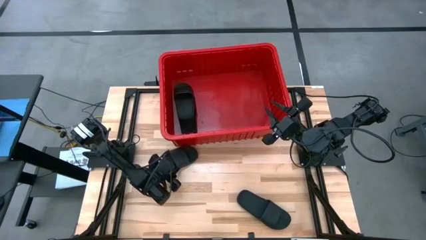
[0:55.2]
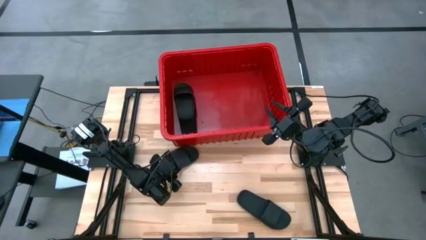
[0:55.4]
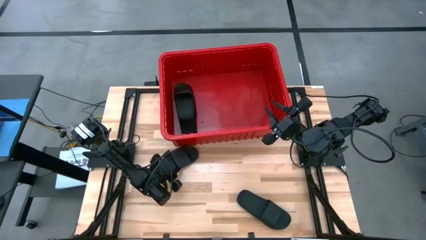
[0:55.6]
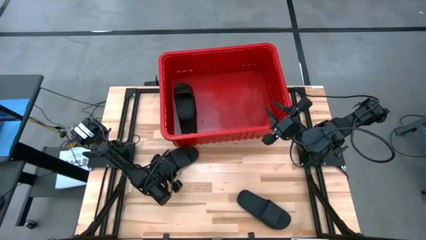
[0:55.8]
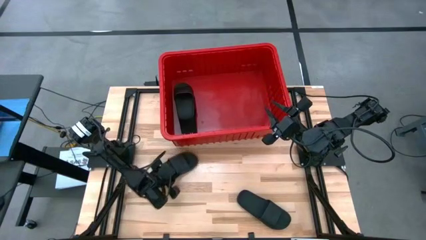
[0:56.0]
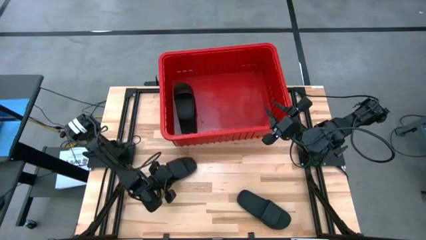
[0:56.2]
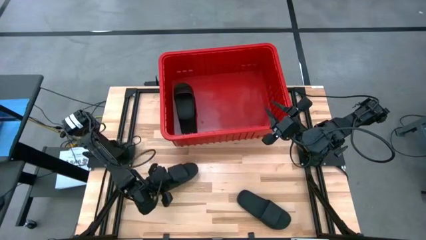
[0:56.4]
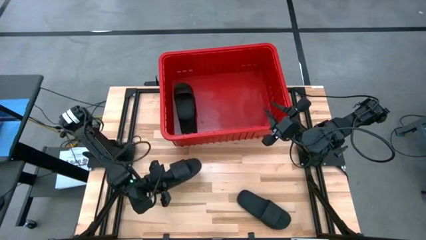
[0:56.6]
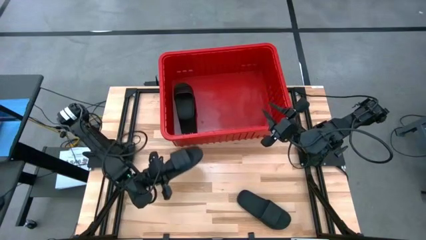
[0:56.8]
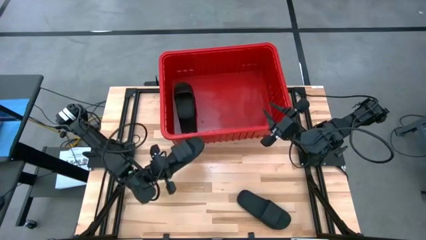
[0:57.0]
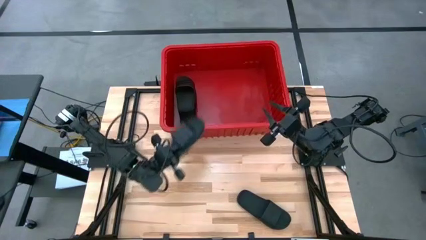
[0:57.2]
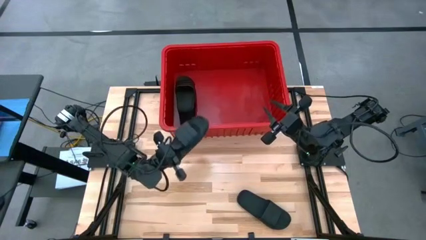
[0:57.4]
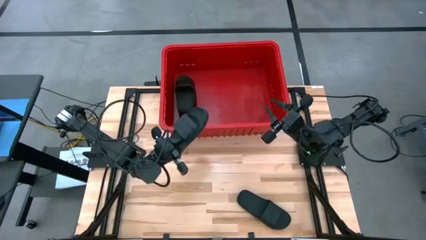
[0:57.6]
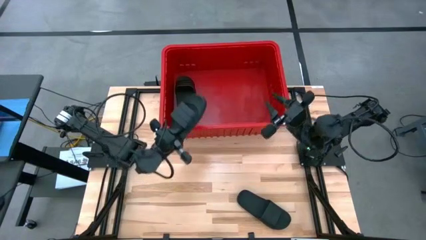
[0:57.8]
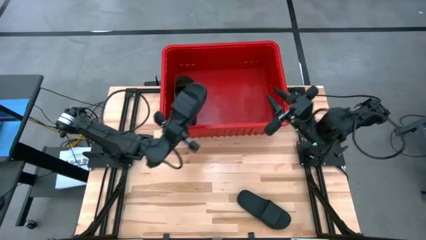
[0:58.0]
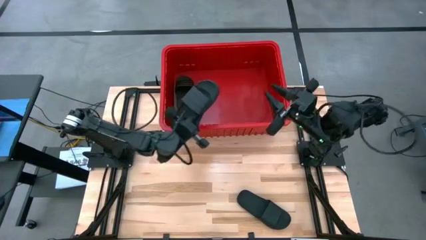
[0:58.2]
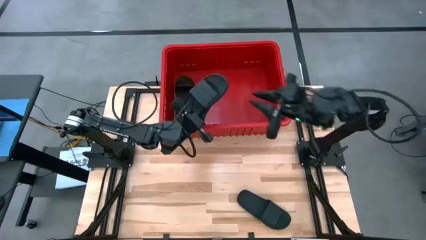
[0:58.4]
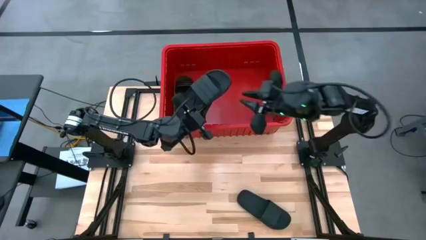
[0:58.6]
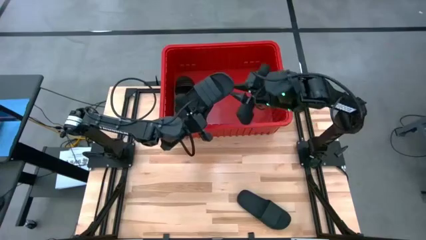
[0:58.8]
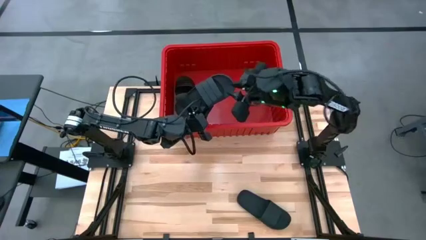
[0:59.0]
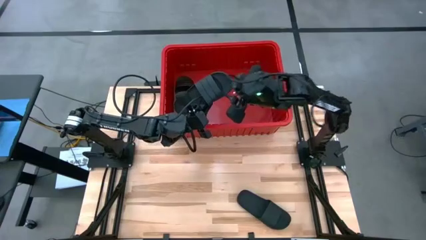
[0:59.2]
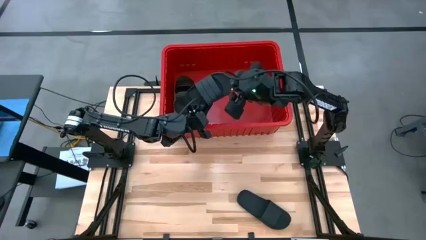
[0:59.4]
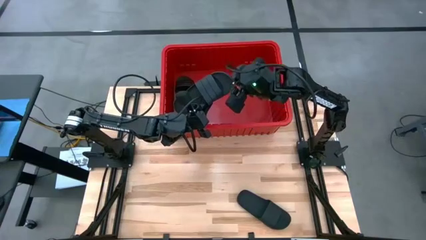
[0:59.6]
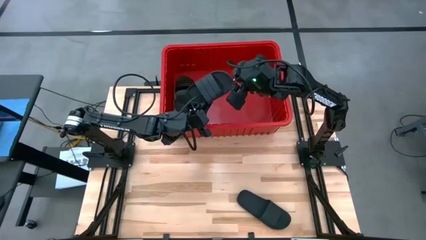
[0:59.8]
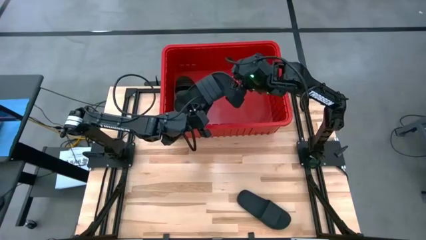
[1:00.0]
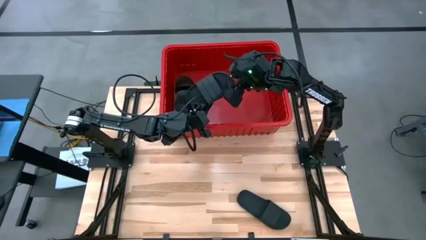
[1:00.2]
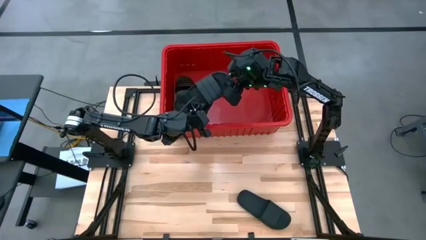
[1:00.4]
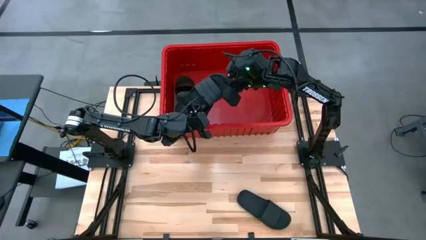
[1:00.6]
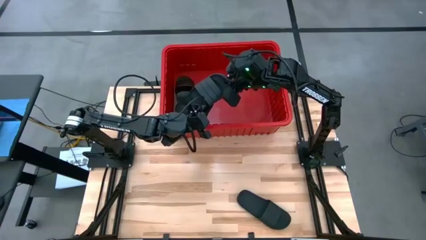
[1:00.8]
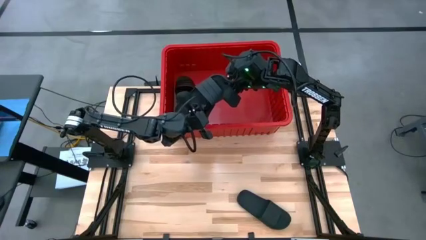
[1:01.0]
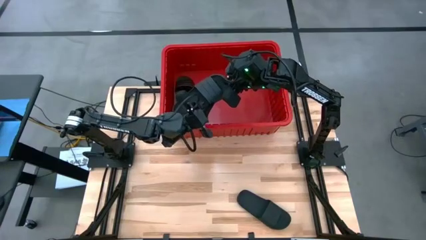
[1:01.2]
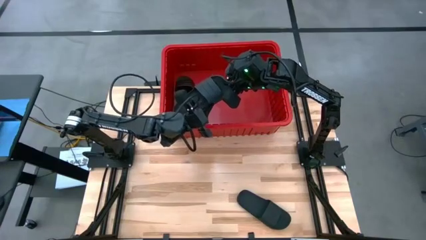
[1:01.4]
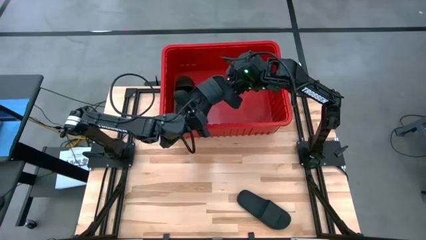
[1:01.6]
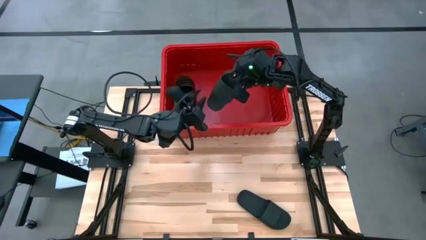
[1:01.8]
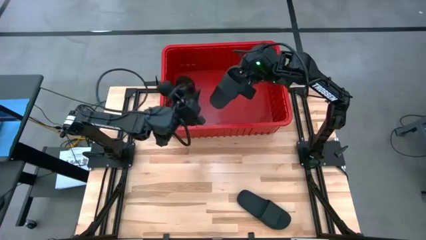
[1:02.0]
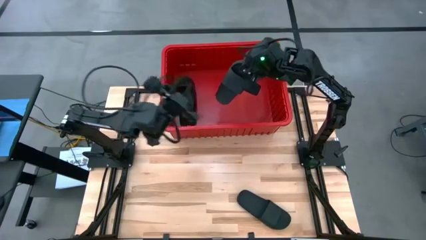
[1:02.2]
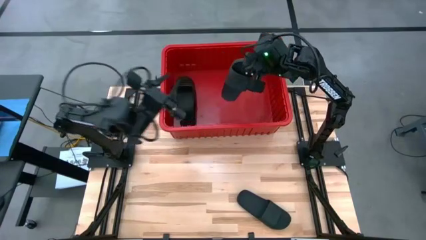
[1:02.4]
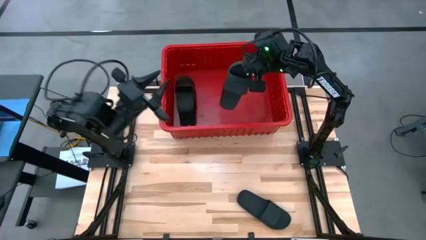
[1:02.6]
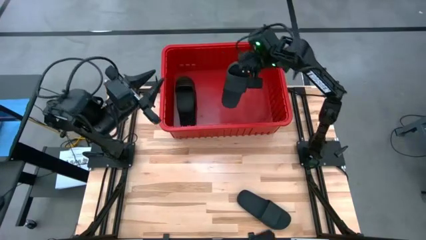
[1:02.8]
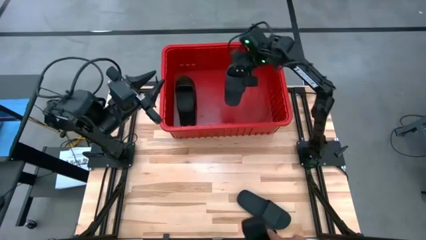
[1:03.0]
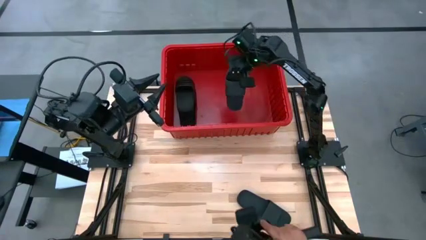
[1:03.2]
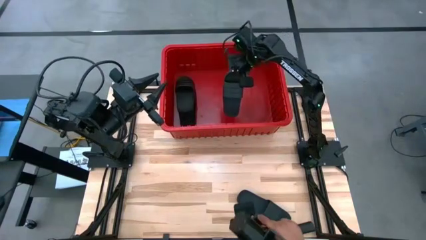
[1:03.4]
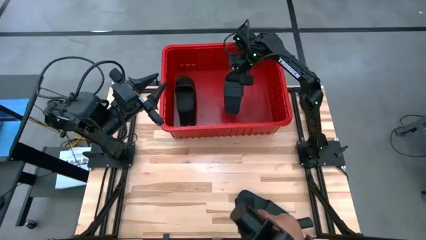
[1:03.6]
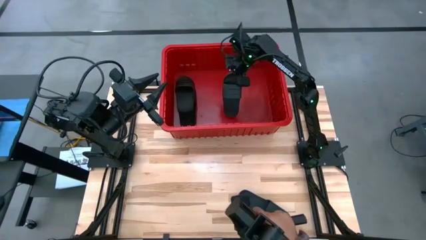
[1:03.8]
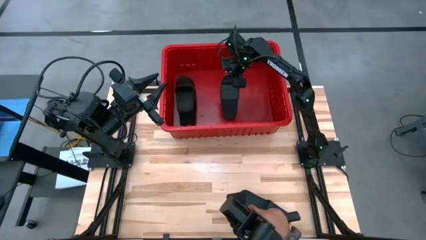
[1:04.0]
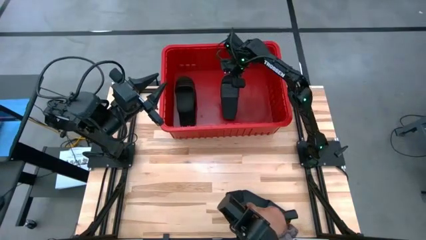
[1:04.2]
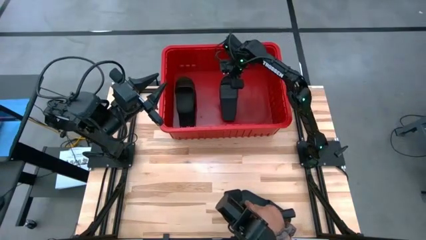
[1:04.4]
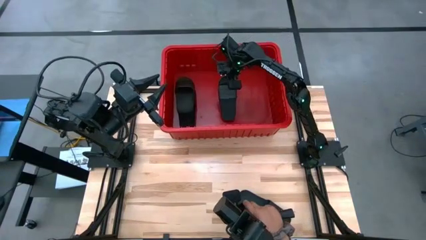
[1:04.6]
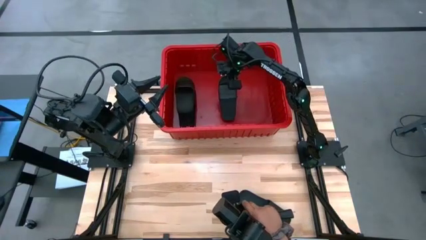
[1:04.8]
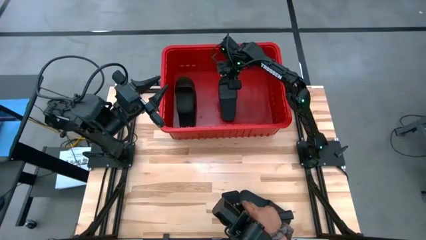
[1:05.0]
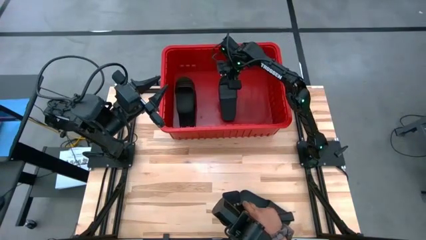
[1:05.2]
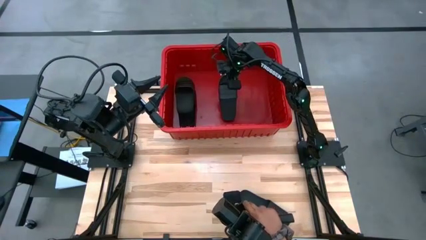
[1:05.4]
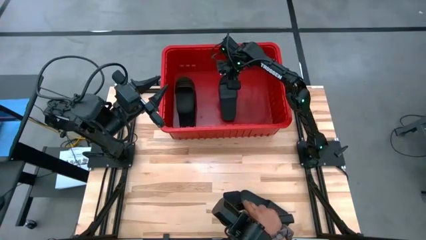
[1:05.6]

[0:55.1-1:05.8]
Task: Pick and place slides into bin
Put the black slide into the red bin
